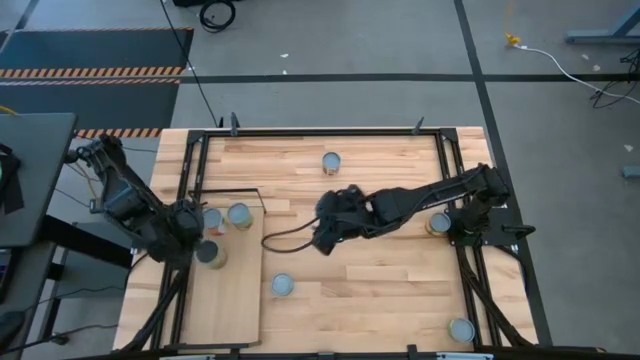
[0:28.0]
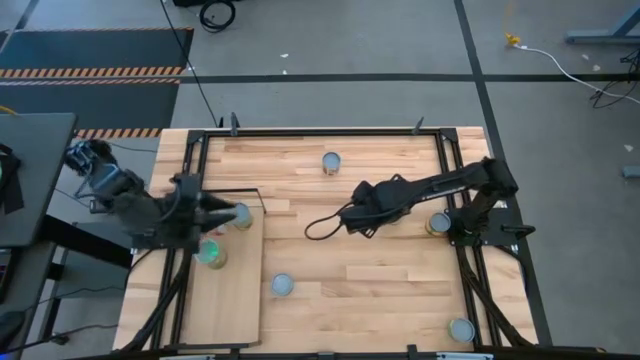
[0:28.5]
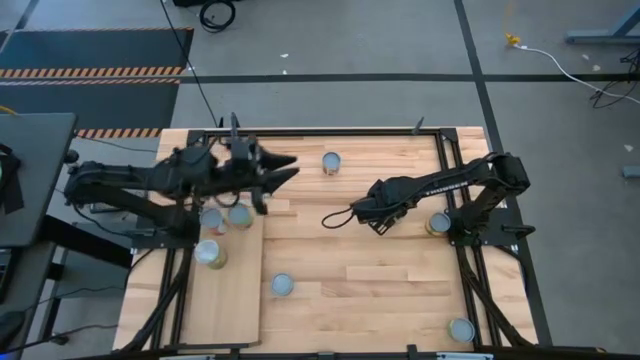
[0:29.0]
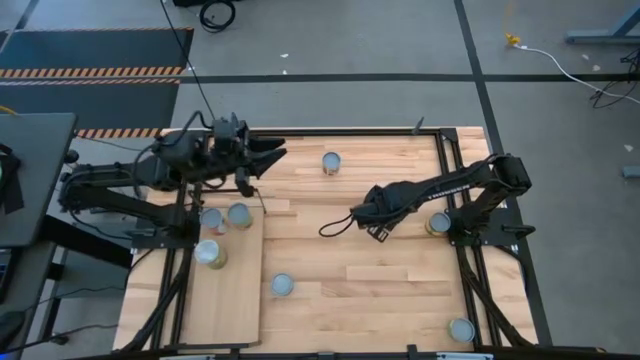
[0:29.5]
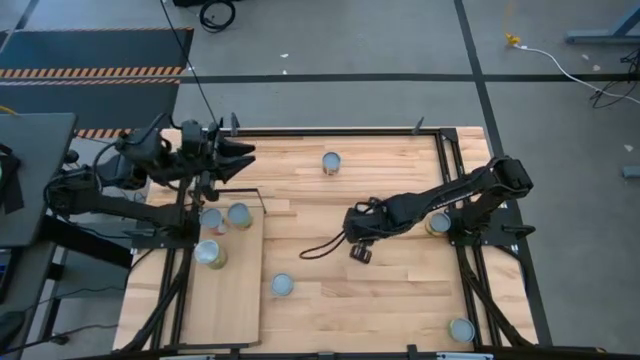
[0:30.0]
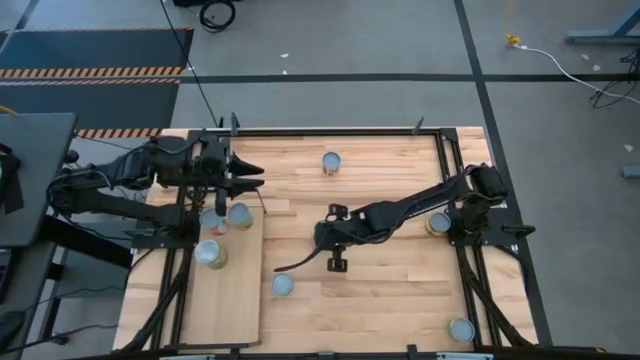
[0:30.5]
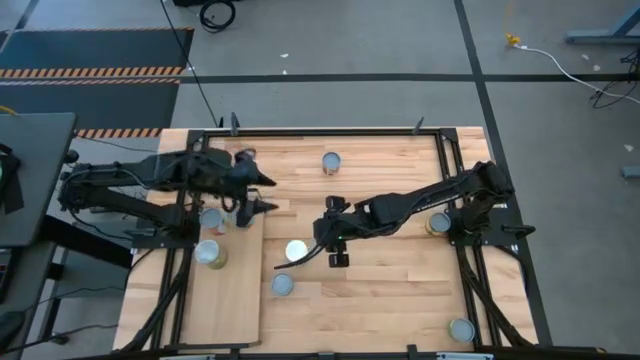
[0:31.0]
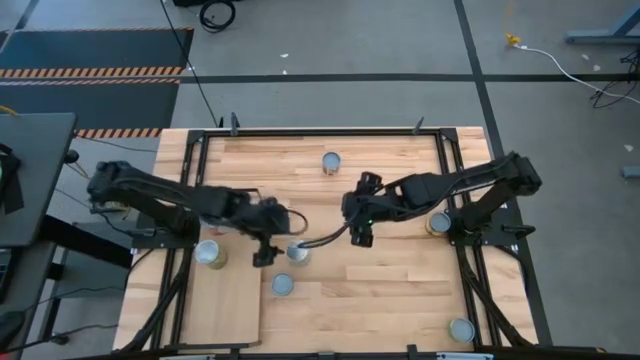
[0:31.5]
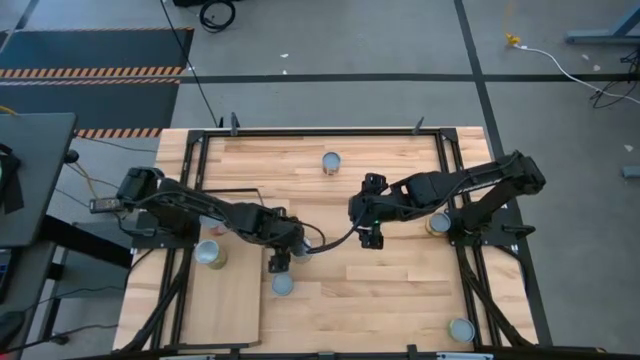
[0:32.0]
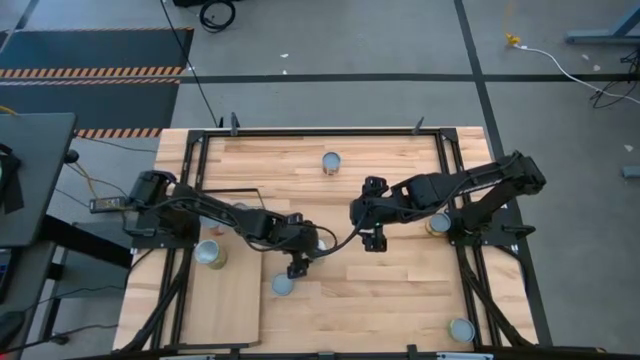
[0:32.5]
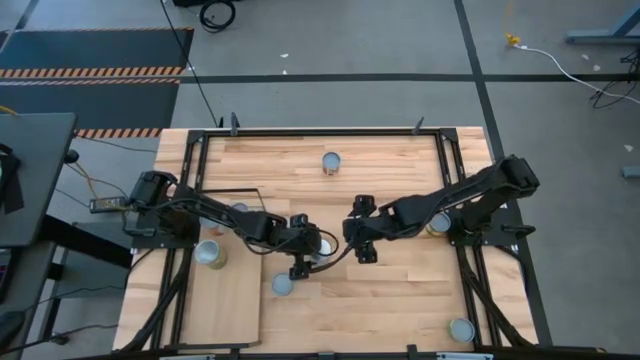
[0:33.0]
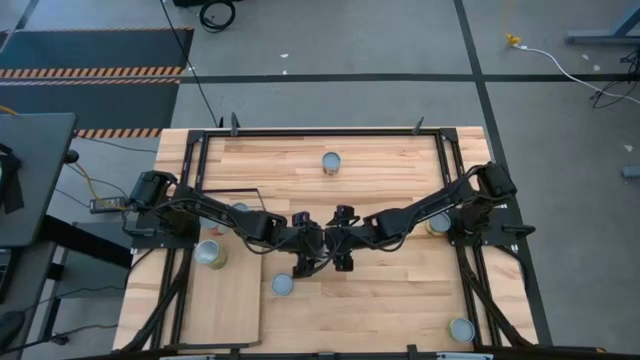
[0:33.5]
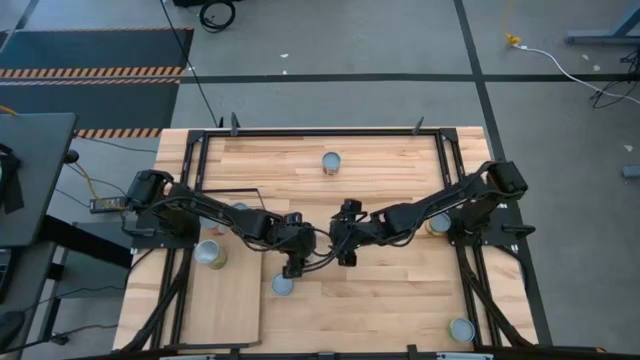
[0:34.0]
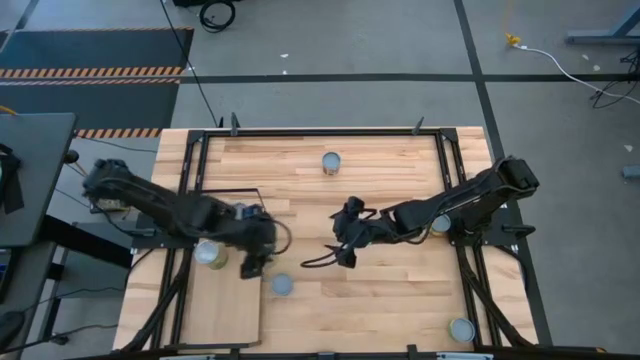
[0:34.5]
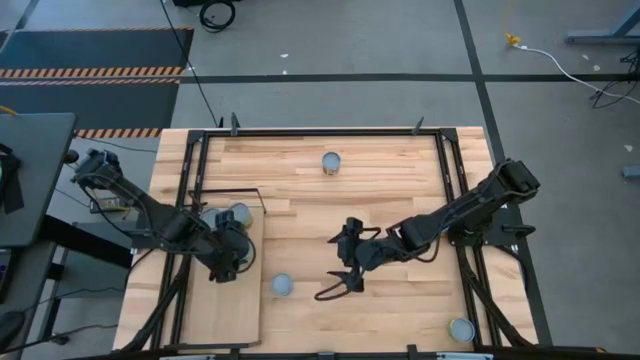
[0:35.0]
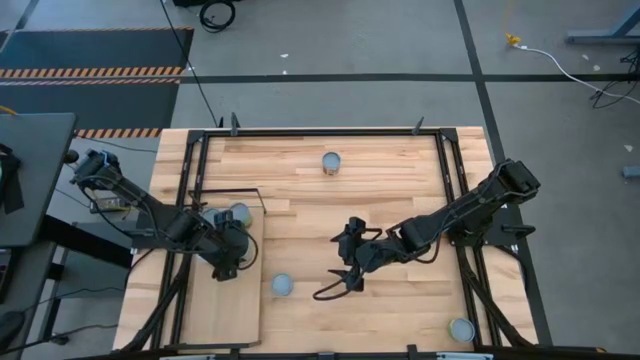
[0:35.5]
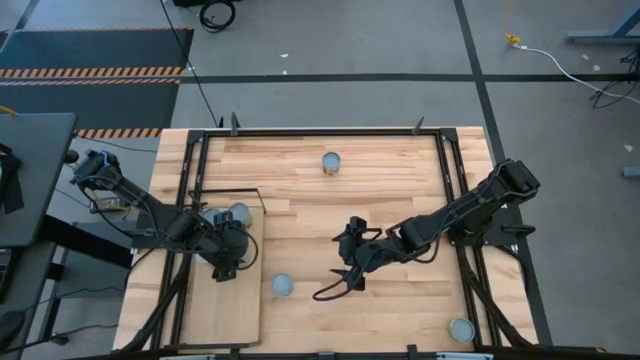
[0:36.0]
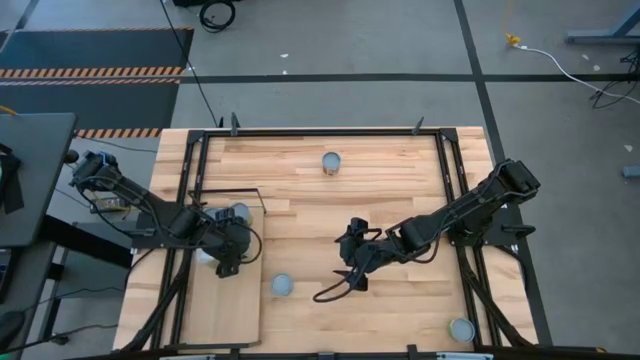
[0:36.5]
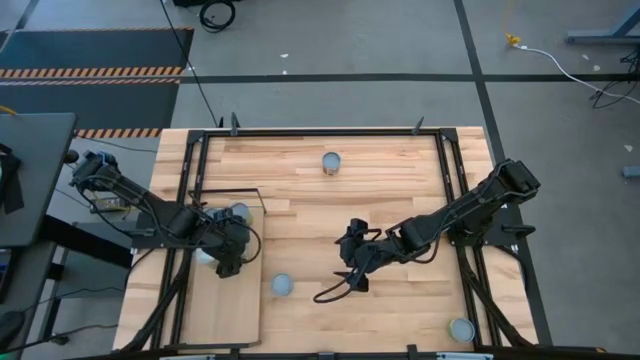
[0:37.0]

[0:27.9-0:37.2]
Task: Pick and place cans onto a shelf
Put the yellow can on the shelf

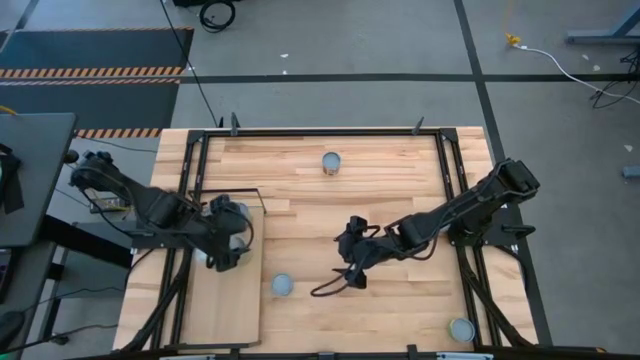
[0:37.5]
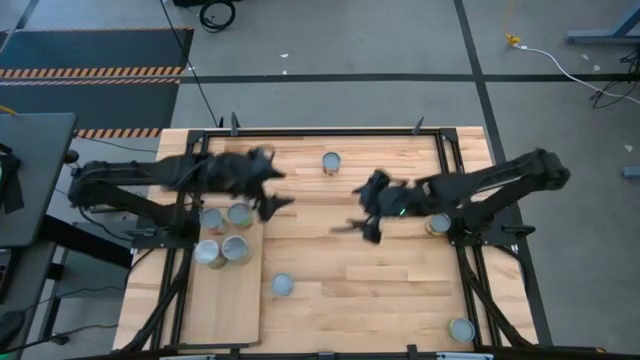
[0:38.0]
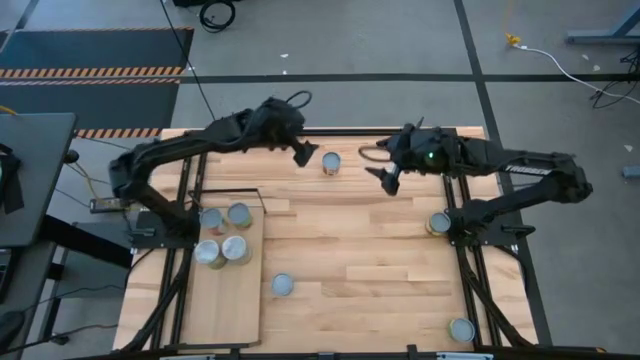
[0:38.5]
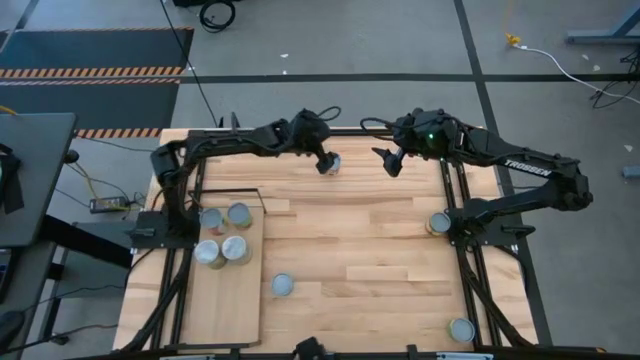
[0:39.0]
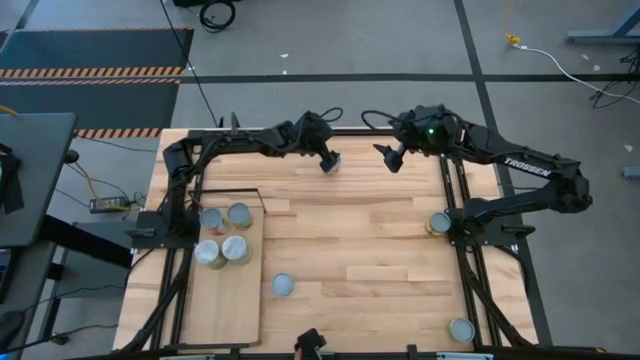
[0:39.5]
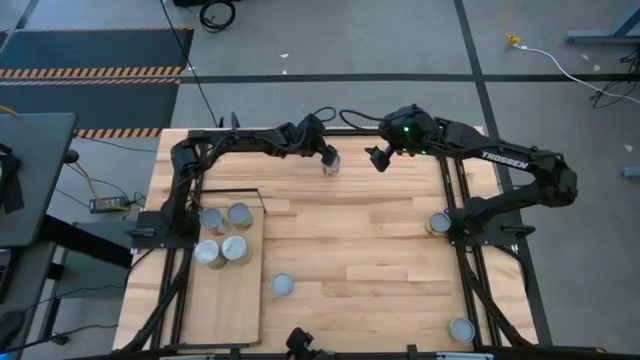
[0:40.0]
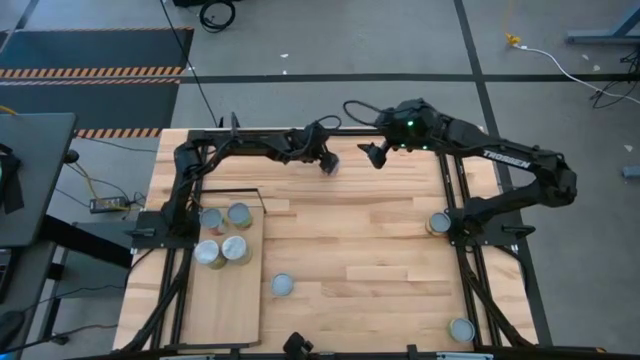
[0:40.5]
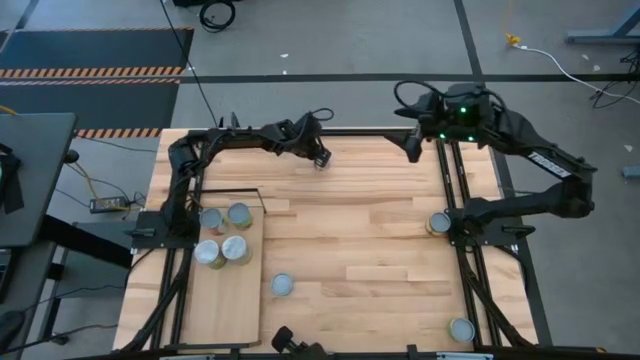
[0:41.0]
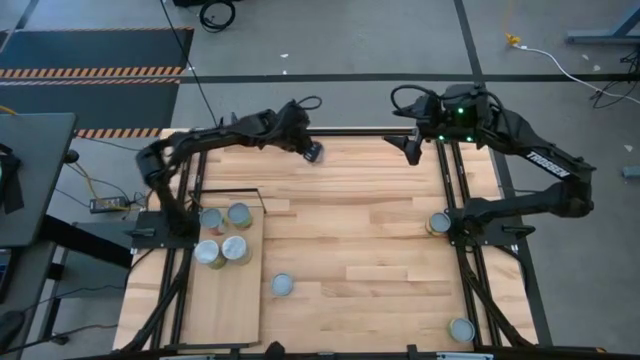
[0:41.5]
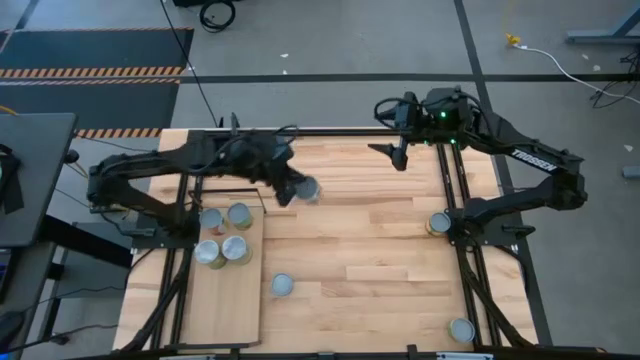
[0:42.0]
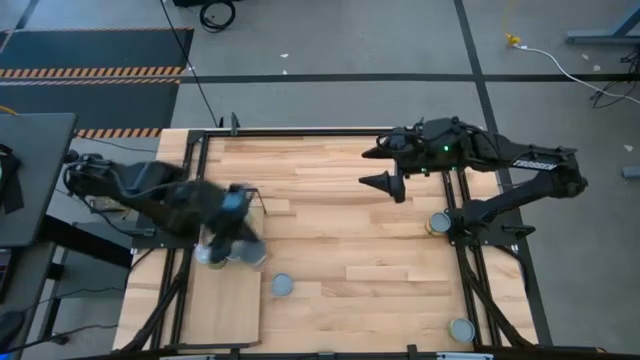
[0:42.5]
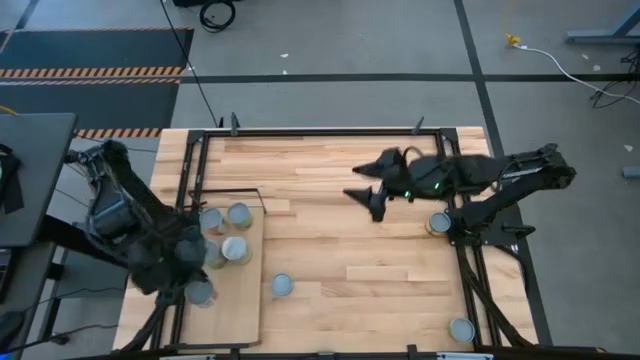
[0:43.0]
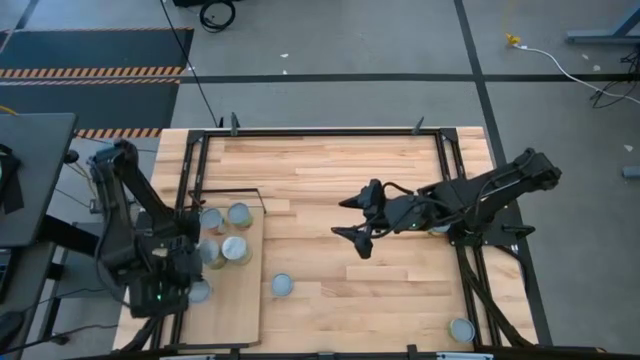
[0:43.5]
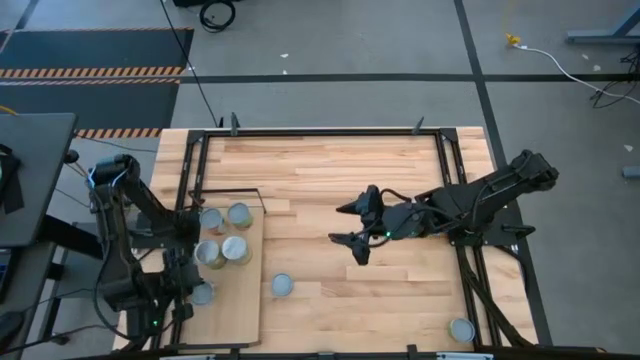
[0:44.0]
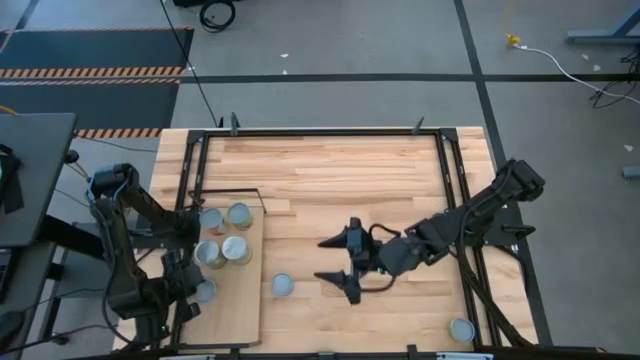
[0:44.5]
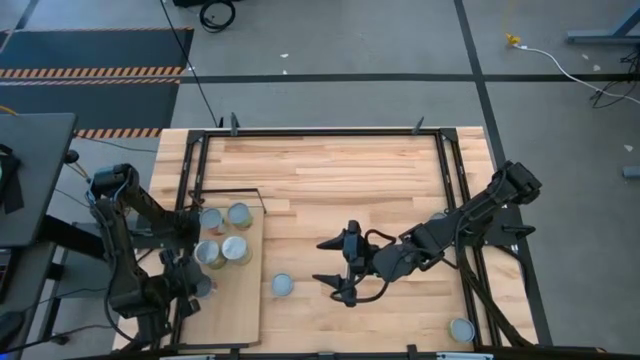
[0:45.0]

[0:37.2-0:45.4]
Put the small white can on the shelf

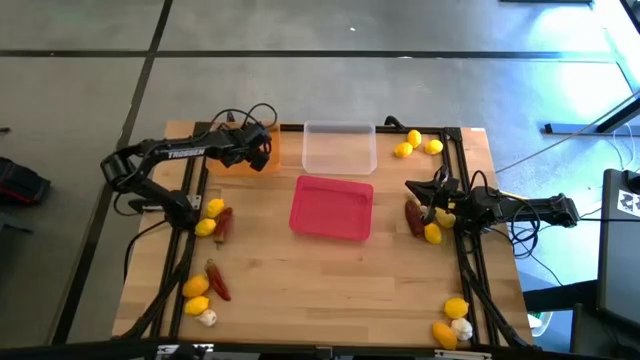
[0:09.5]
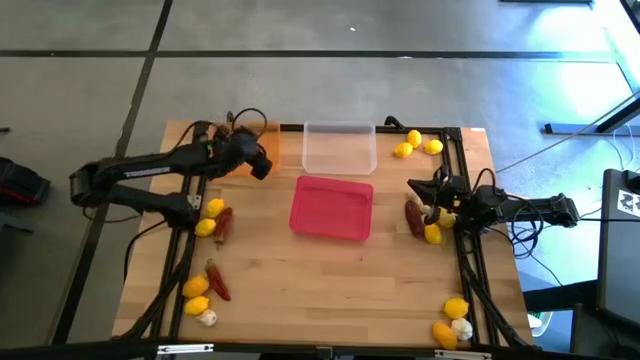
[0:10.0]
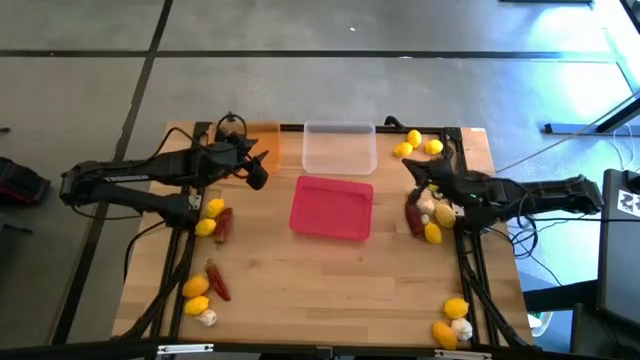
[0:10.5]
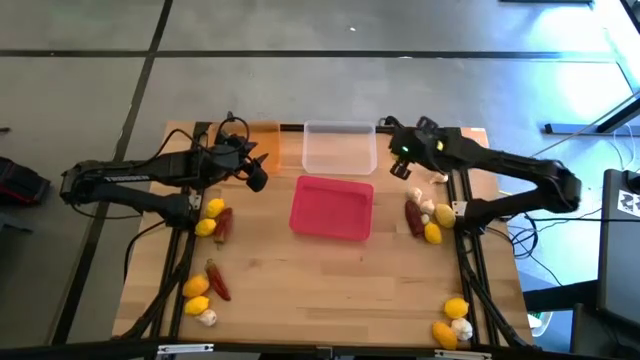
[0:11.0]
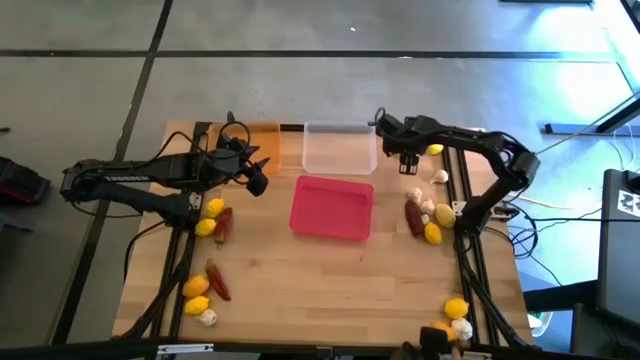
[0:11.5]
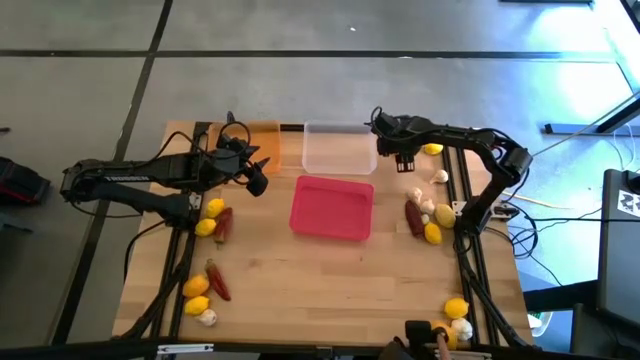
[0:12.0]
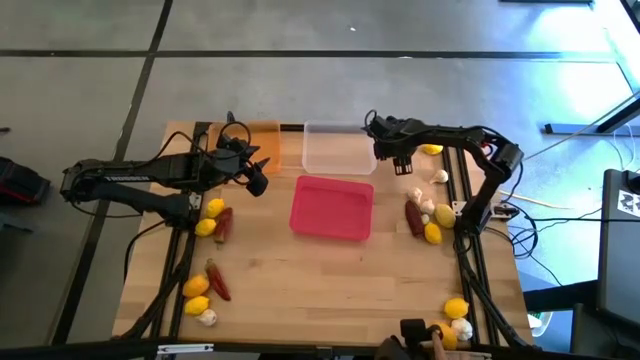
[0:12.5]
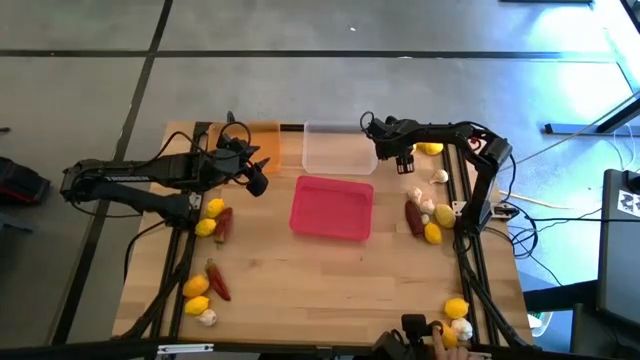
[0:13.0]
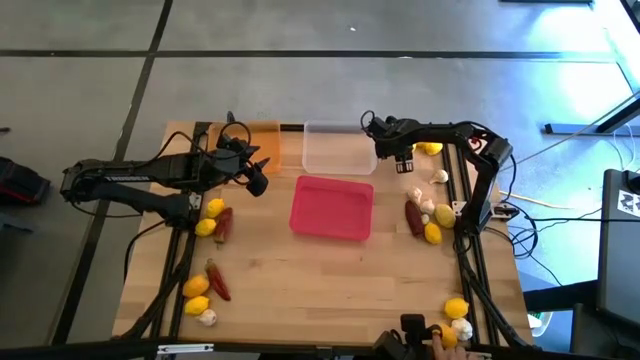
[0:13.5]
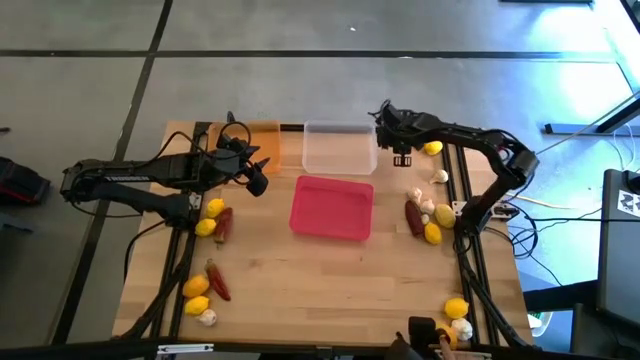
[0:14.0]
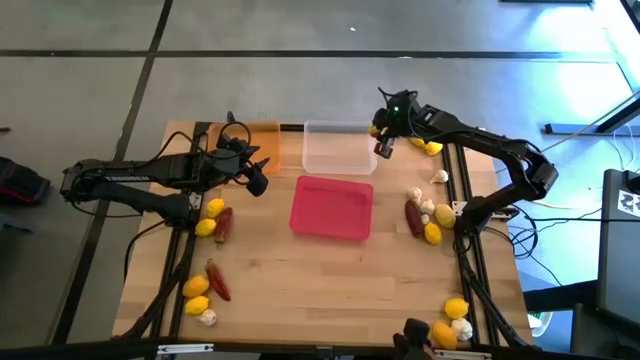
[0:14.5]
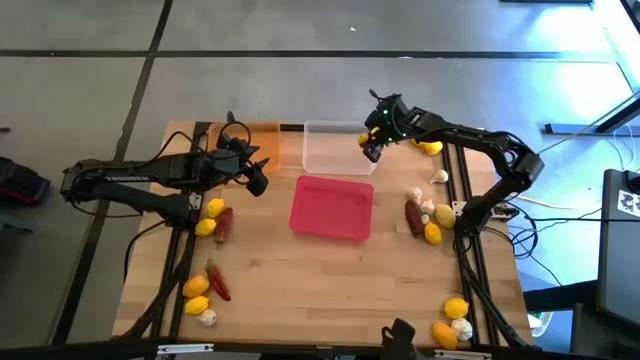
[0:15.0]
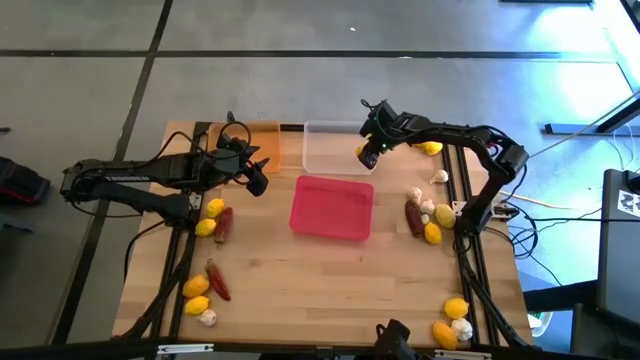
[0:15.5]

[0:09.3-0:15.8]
Task: Sort produce into baskets
Put the yellow lemon in the transparent bin
